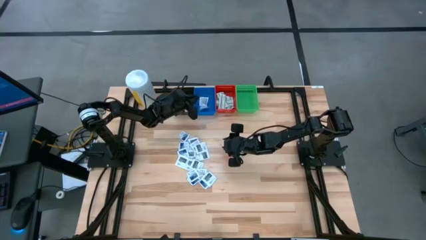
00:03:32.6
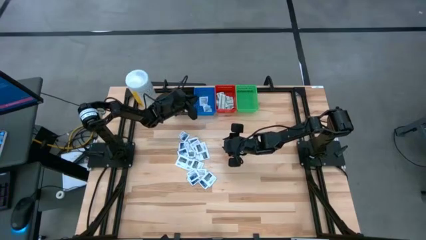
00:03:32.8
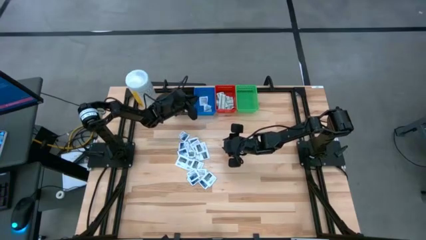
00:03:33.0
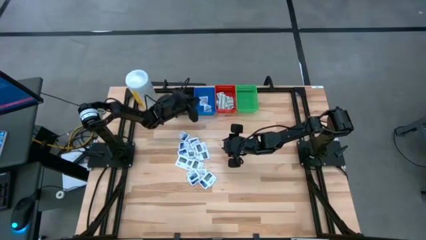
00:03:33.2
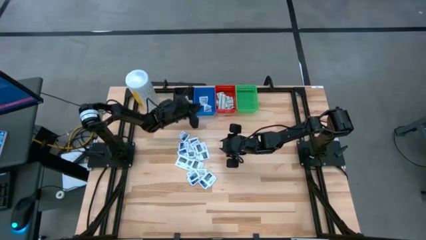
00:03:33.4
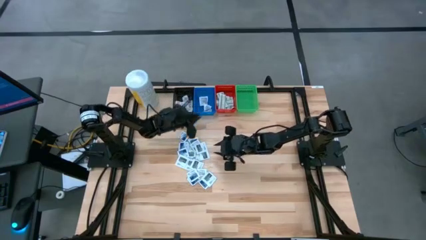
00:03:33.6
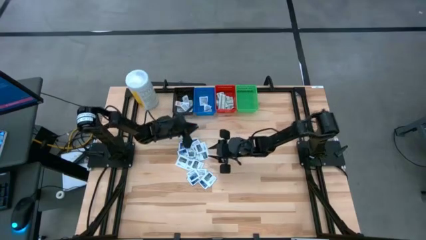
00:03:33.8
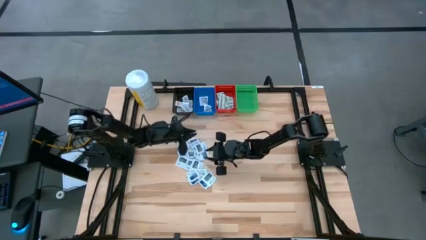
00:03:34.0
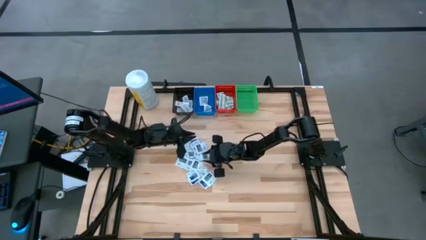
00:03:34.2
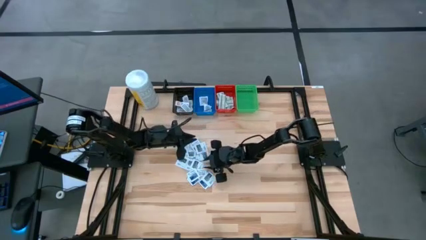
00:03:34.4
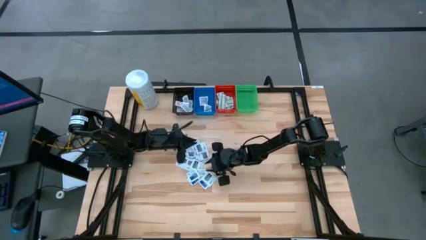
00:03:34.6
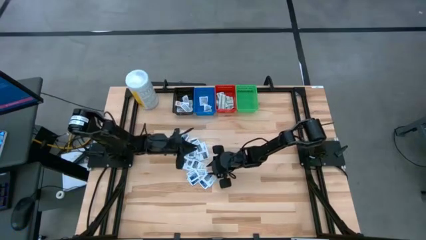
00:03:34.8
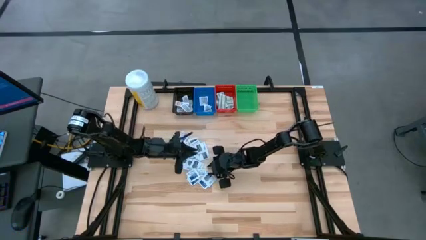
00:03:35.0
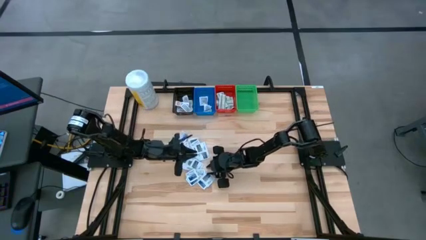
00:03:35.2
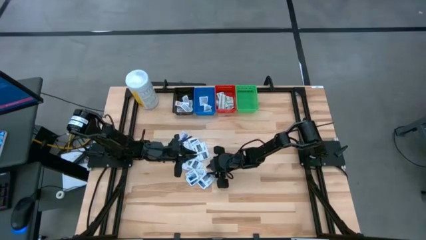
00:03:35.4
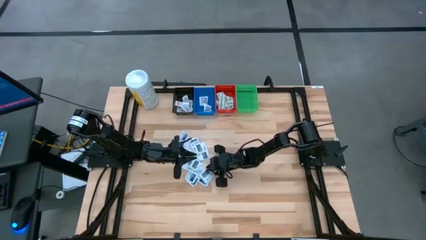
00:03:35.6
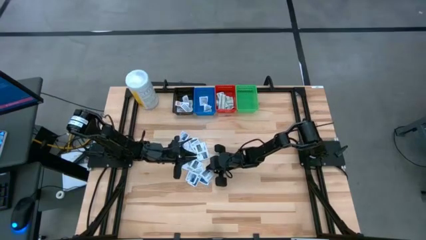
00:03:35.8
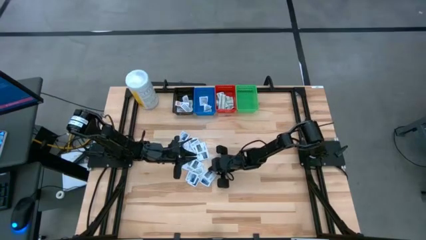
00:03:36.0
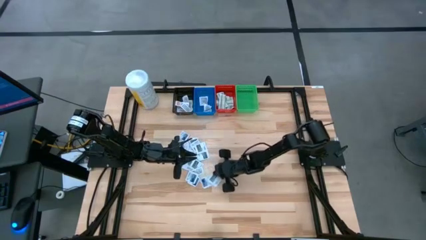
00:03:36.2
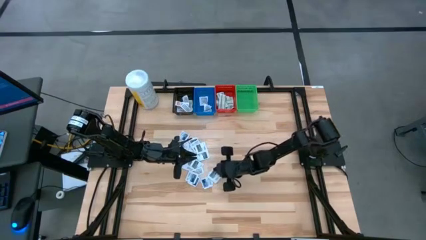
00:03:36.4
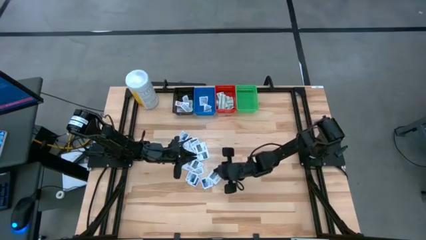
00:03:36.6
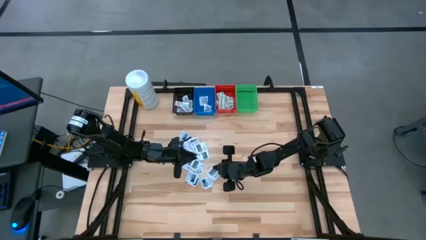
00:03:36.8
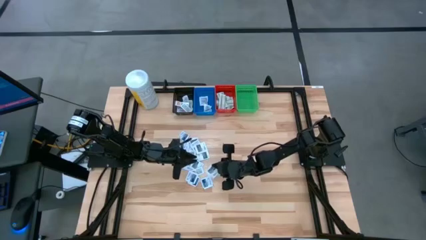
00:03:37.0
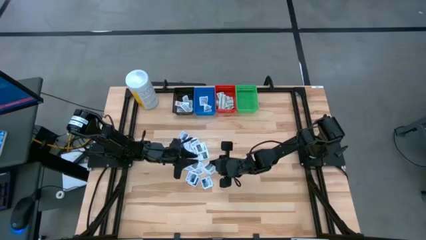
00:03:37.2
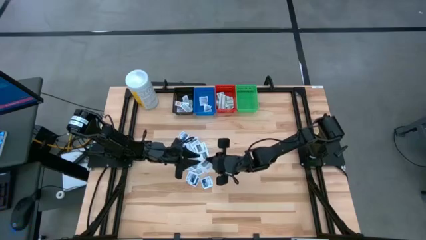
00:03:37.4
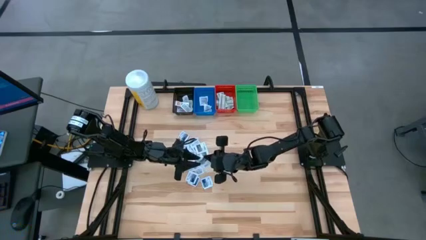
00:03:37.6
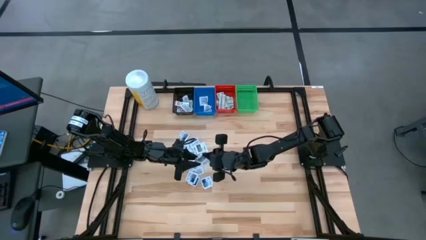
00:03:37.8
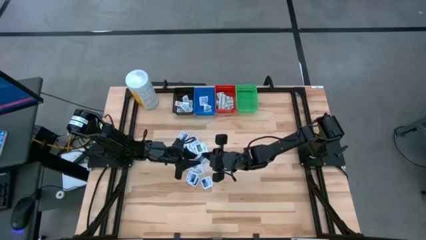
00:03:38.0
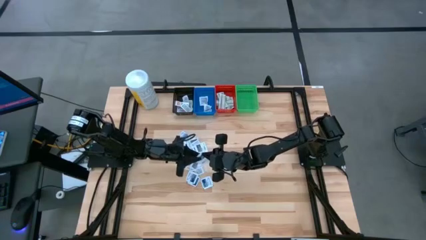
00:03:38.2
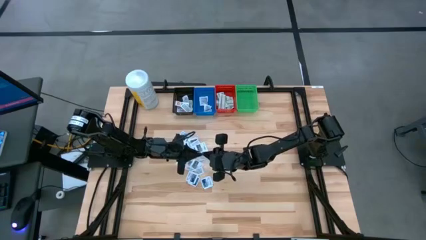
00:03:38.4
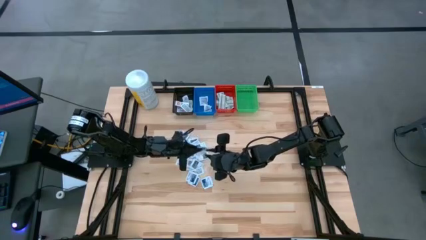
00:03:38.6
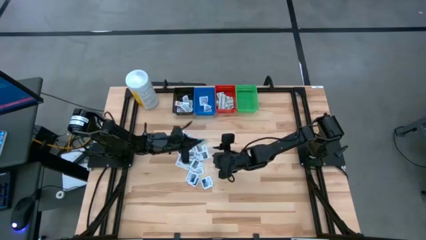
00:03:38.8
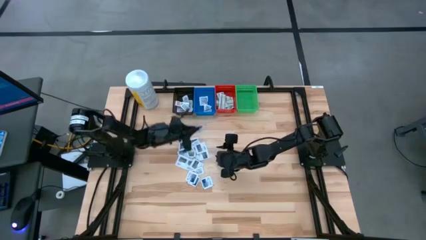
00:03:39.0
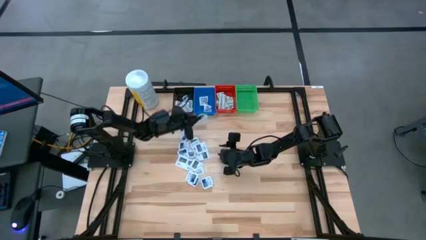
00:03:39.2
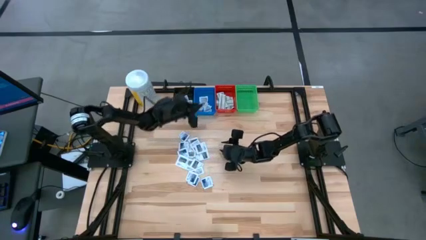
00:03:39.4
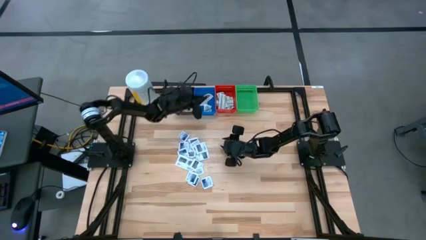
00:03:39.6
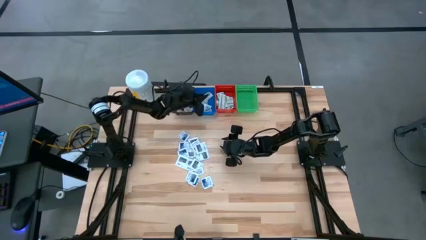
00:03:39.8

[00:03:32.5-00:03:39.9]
Task: Pick & Place First Aid Supplies
Put the gray towelette pack into the blue bin

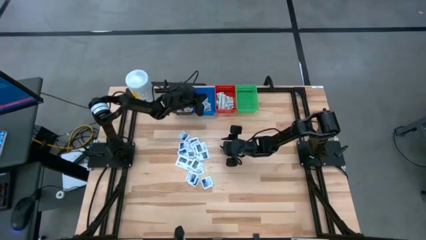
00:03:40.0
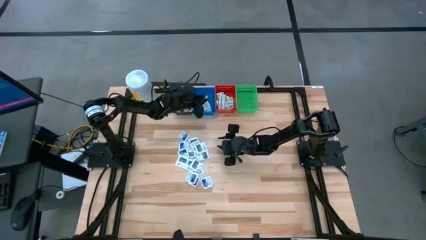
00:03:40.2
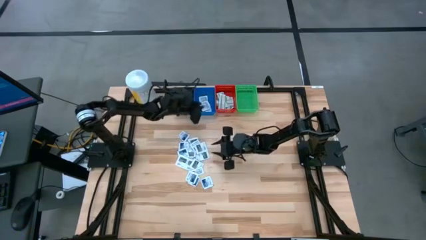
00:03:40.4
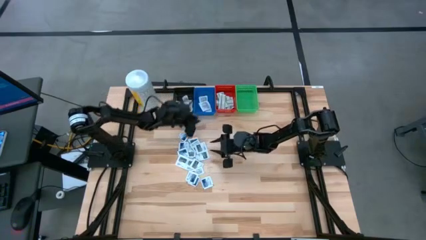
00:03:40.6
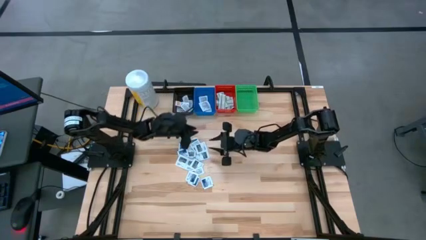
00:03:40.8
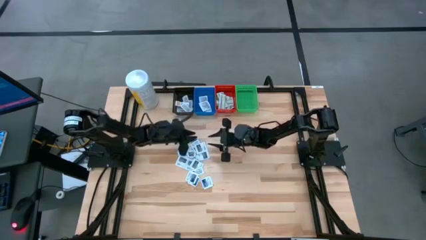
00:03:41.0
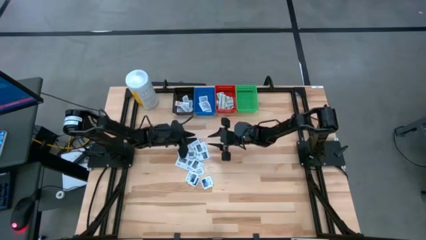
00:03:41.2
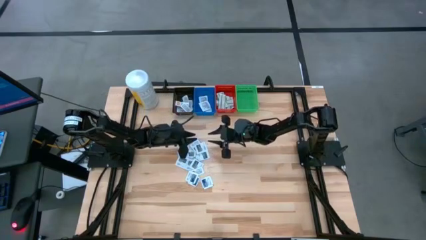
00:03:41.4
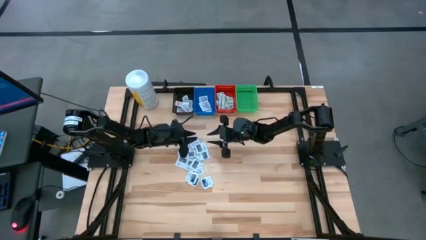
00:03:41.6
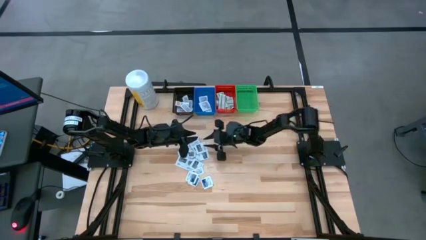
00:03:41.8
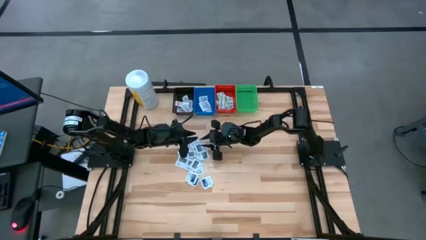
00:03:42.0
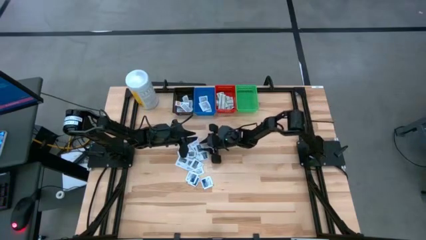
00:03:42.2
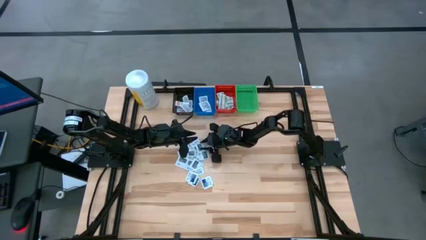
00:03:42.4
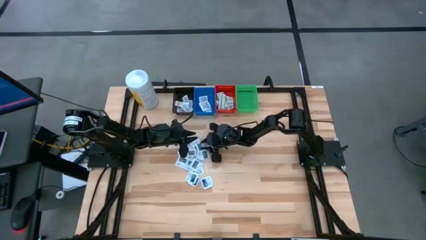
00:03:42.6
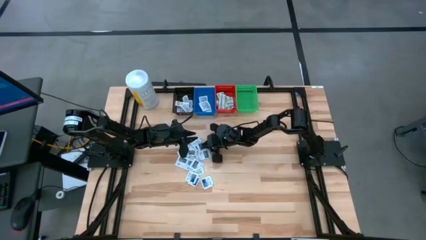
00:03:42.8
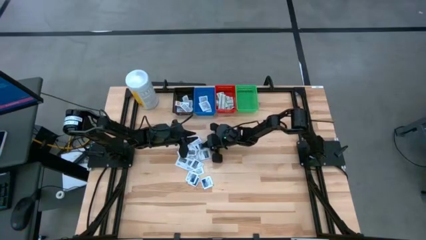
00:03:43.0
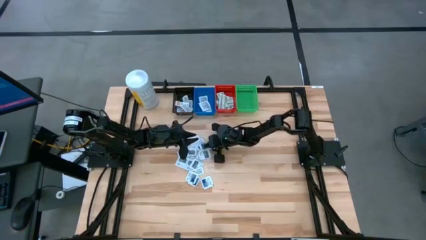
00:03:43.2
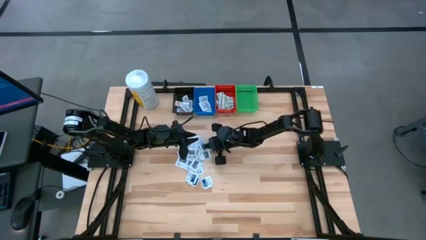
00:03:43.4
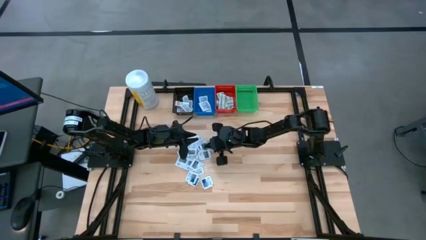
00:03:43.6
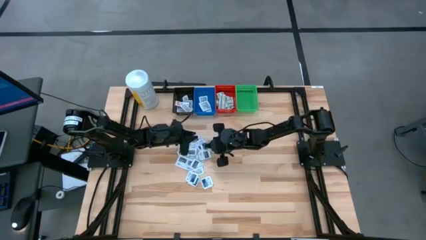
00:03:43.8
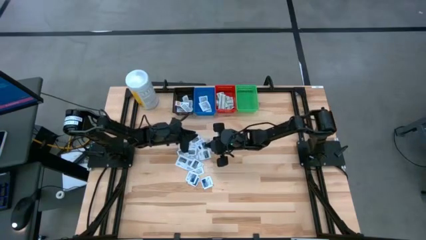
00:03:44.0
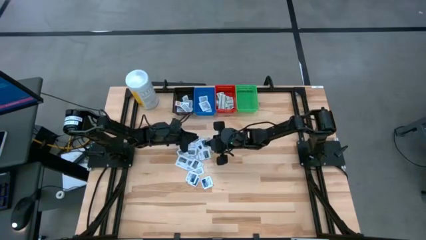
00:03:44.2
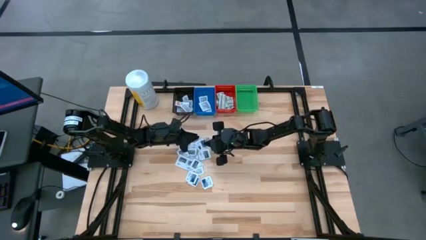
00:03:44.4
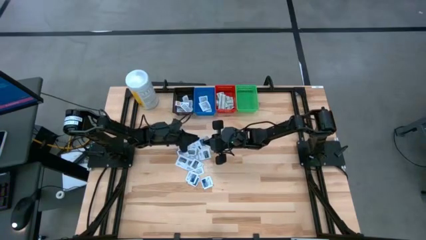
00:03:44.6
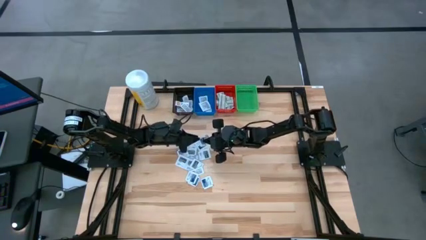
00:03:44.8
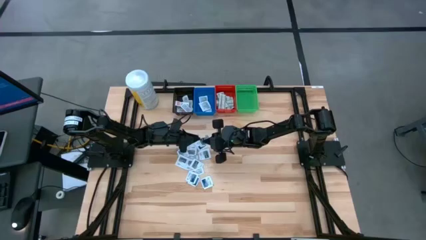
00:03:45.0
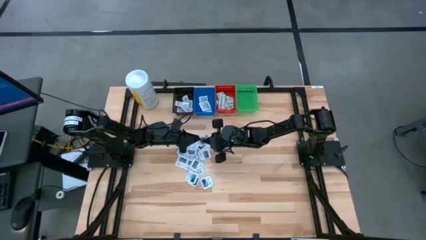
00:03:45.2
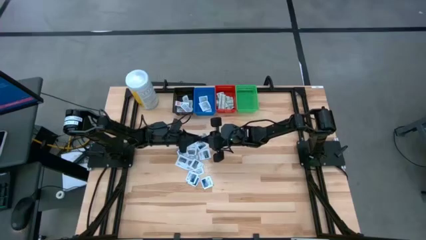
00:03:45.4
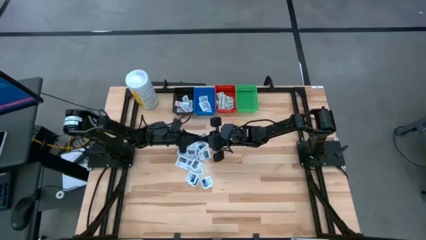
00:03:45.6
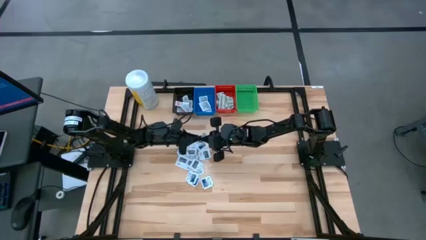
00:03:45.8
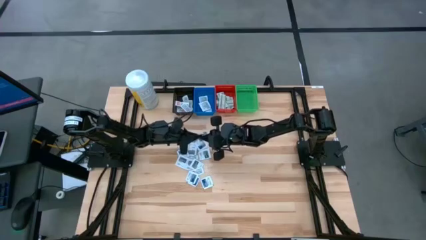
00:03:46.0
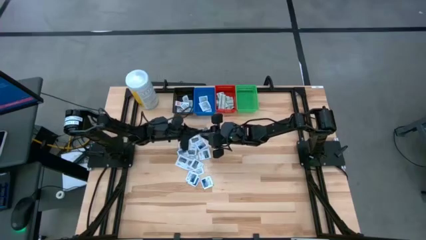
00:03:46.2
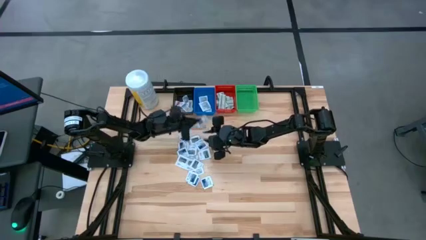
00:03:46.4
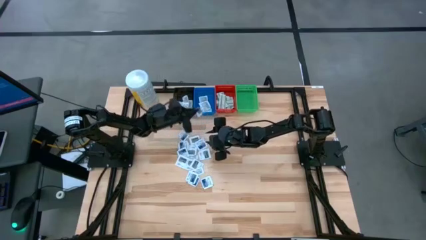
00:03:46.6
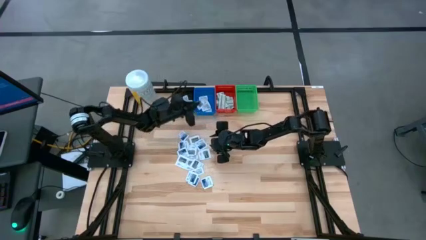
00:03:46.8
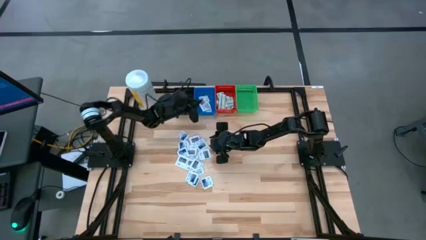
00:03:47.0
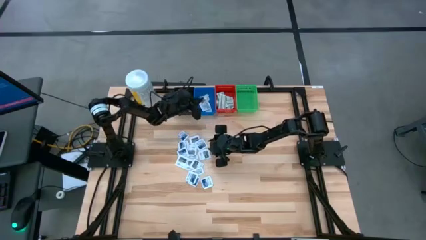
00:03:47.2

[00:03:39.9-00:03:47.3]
Put the gray towelette pack into the blue bin
